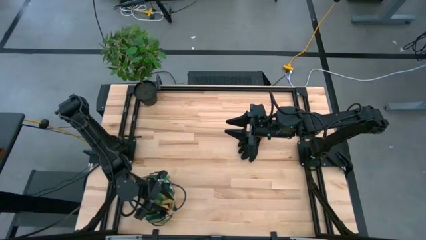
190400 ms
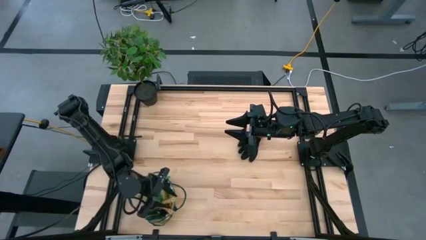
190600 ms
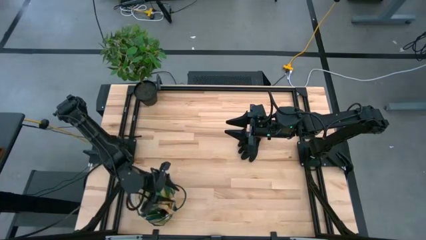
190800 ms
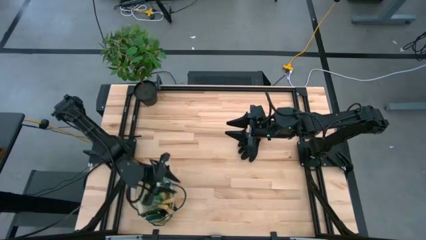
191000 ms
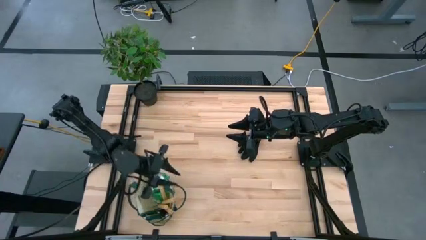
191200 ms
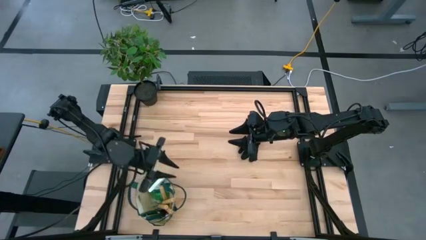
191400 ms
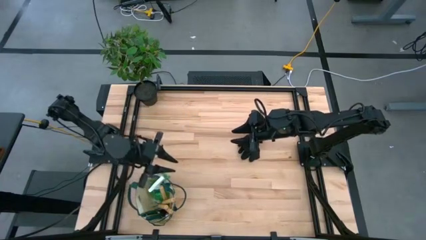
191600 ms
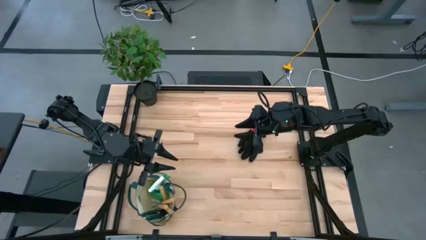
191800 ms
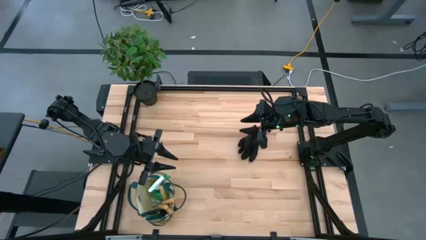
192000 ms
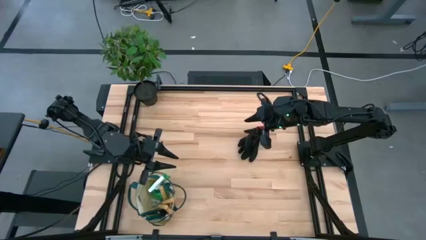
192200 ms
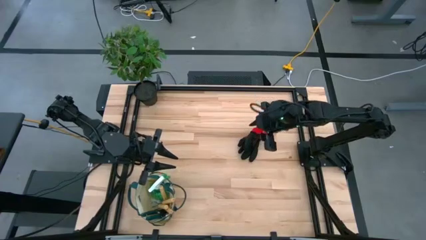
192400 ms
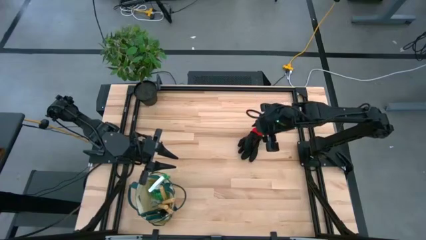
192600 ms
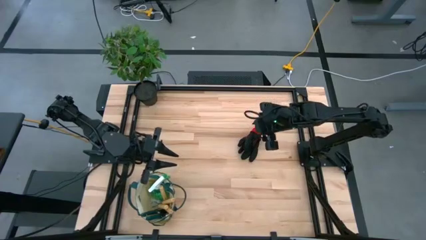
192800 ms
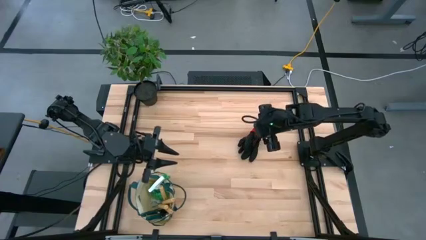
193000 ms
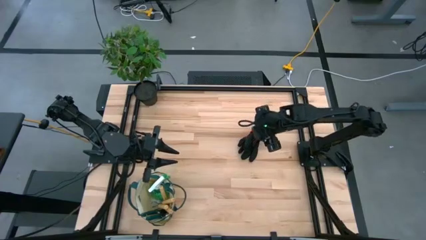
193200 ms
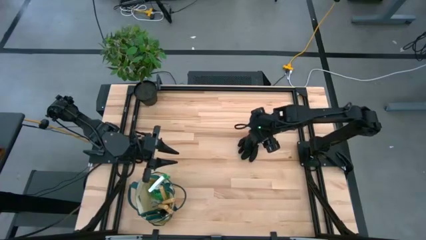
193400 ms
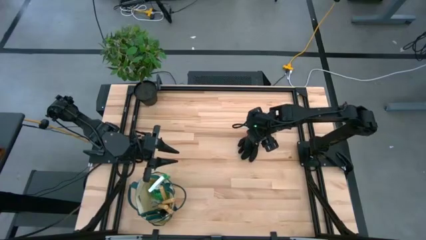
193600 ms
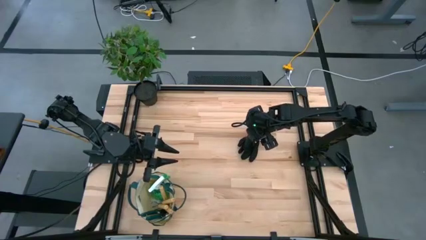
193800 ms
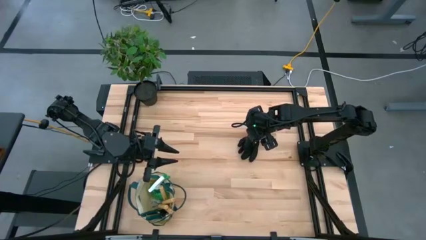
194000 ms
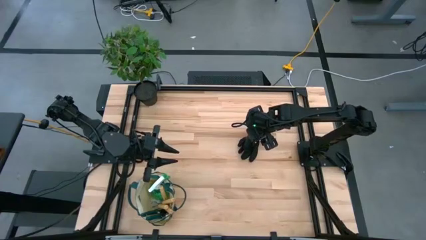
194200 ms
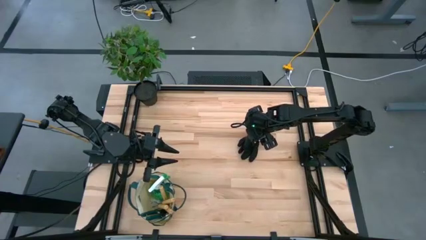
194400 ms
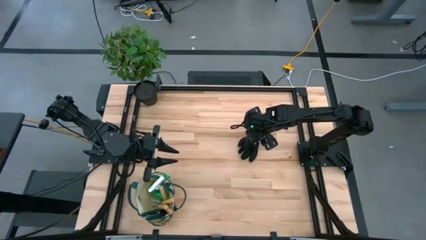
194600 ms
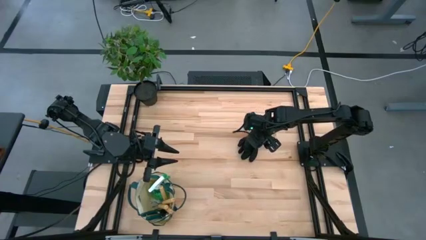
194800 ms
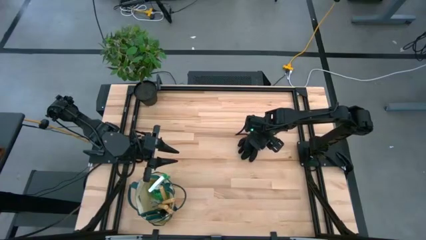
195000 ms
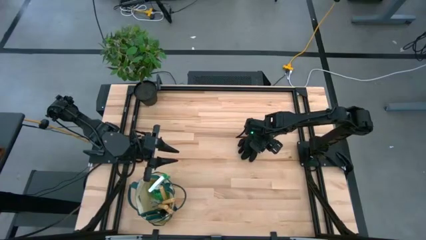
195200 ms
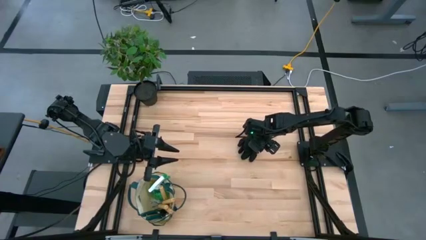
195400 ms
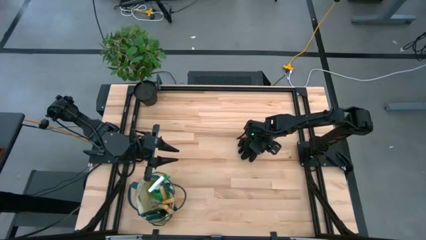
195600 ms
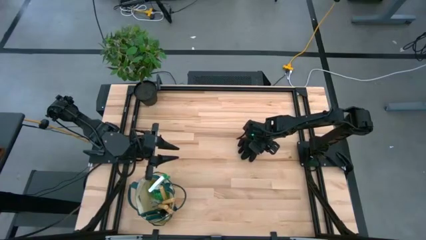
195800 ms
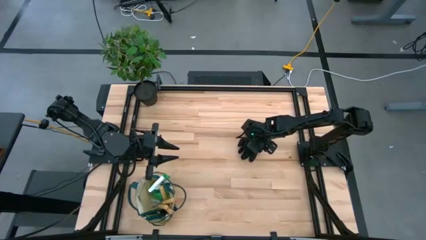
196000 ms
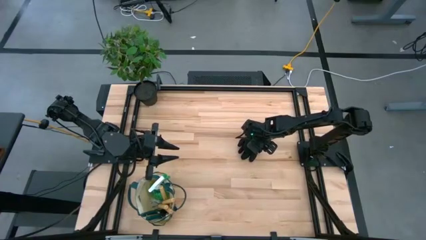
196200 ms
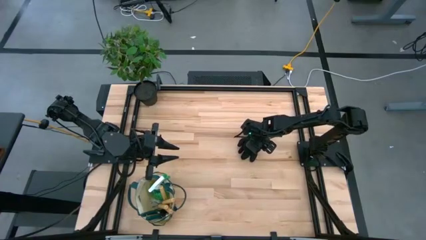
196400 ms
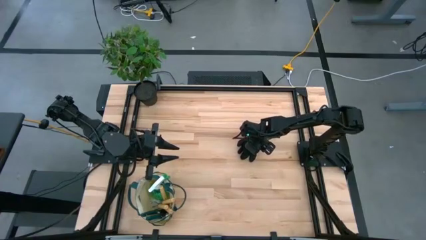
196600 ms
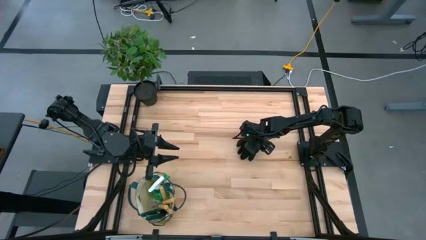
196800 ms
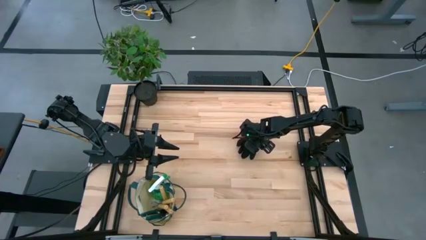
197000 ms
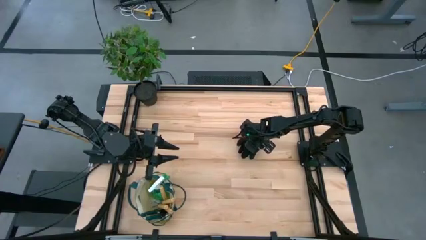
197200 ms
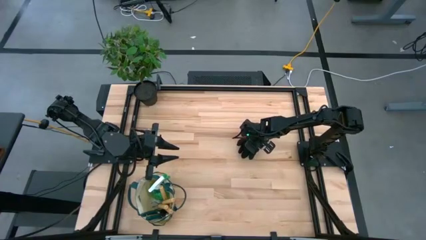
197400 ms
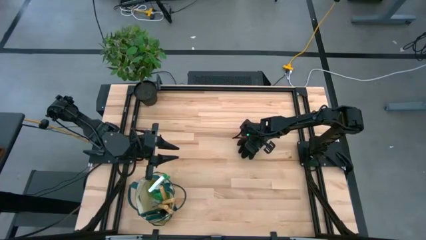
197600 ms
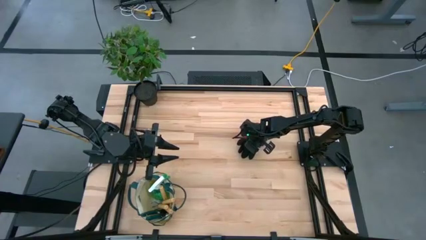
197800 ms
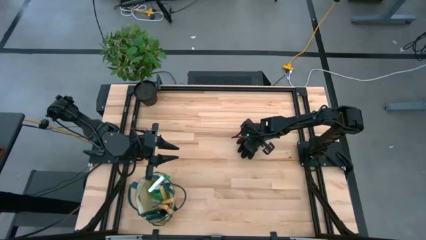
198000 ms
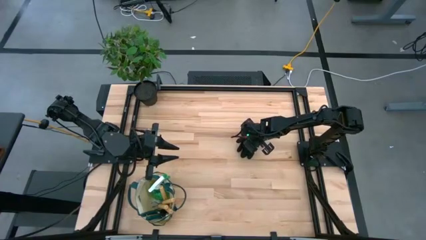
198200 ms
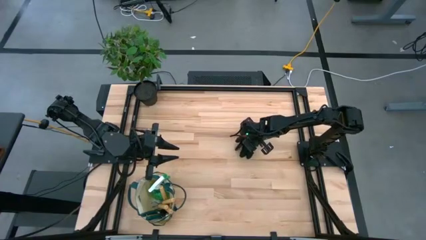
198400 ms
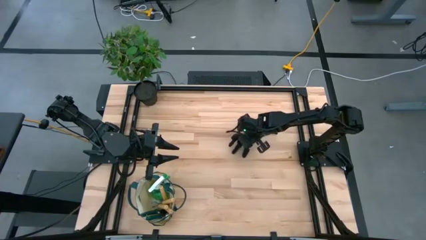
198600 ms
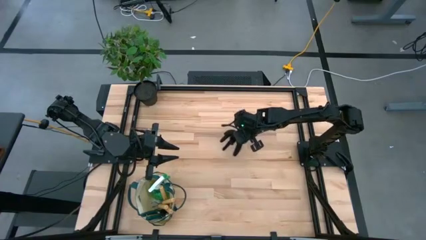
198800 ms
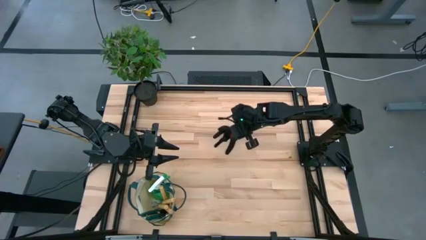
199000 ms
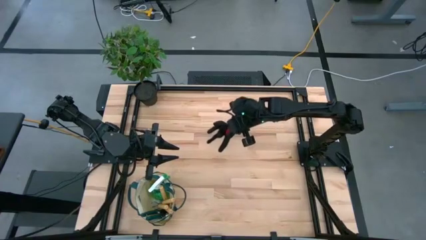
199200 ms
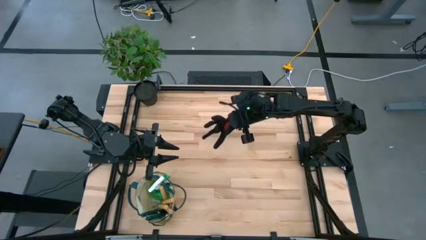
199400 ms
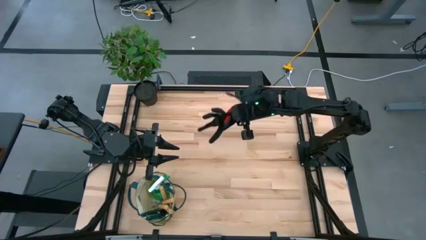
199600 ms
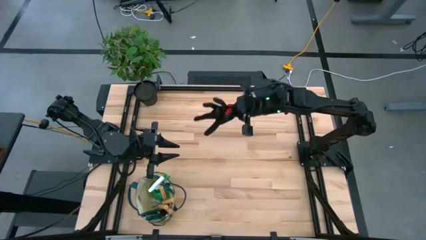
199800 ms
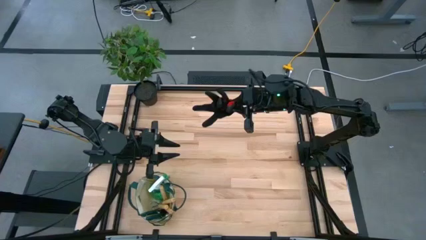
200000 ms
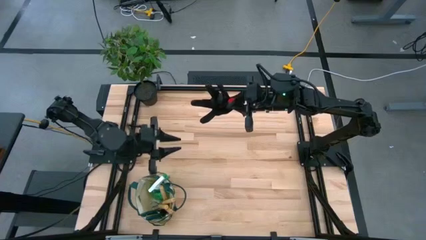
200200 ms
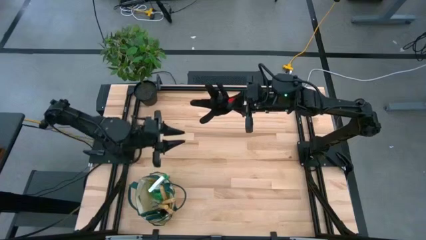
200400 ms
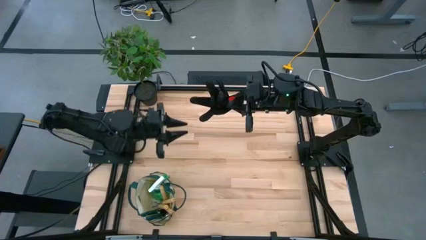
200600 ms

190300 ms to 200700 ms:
Task: Pick & Place Garden tools in Gardening bag
Put the gloves into the gardening bag
